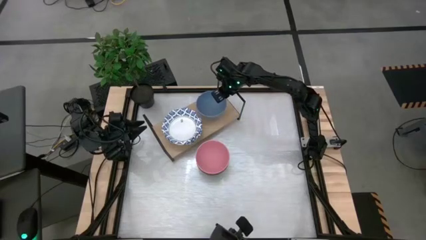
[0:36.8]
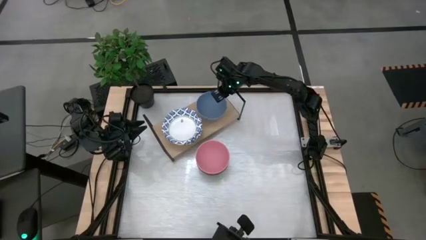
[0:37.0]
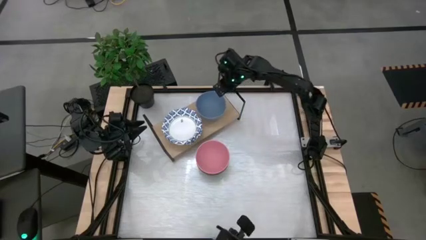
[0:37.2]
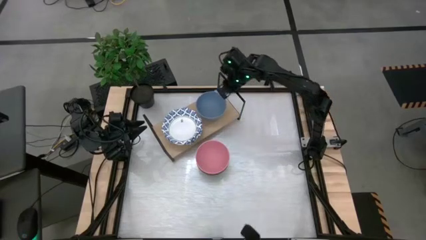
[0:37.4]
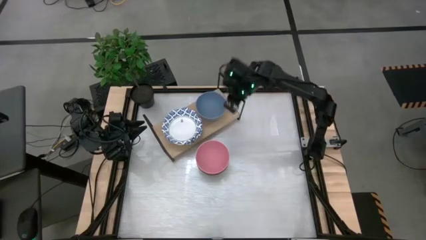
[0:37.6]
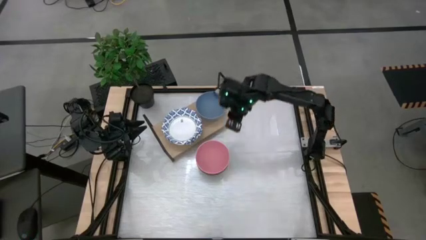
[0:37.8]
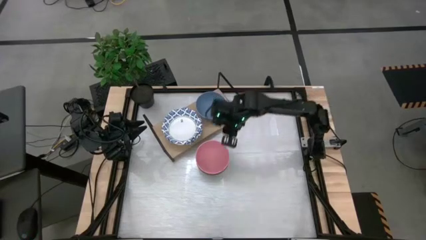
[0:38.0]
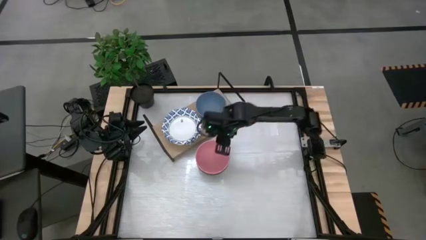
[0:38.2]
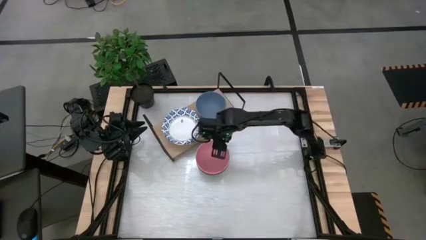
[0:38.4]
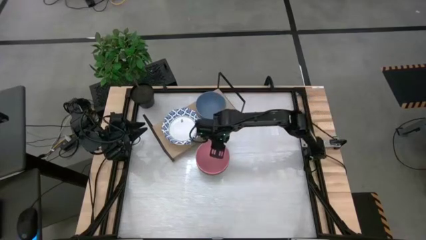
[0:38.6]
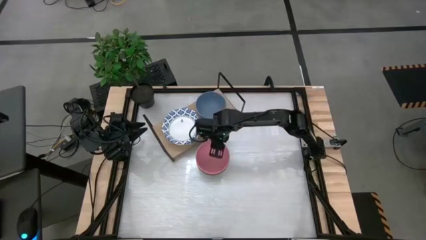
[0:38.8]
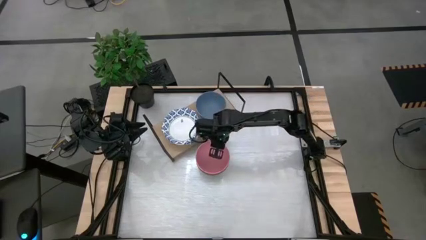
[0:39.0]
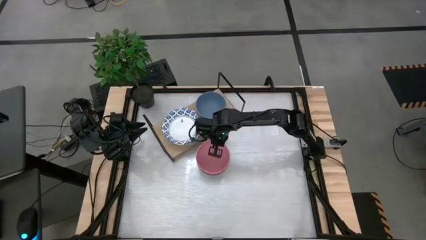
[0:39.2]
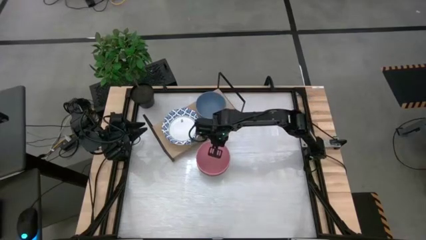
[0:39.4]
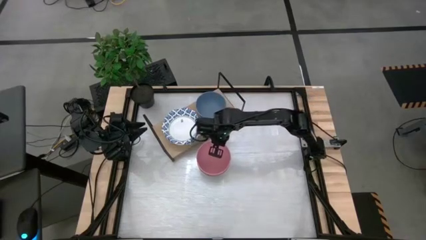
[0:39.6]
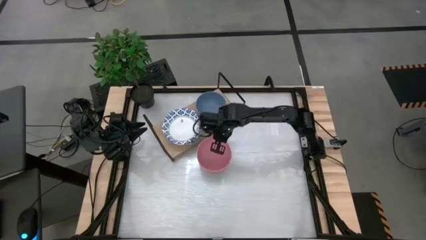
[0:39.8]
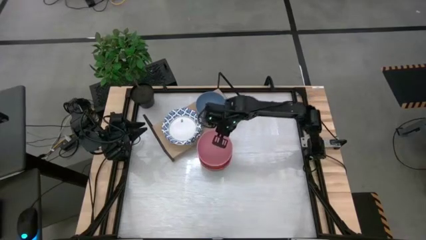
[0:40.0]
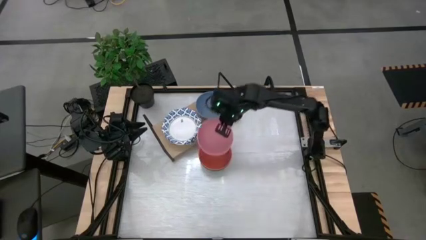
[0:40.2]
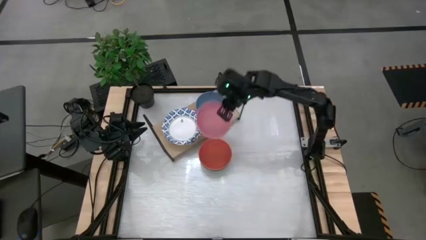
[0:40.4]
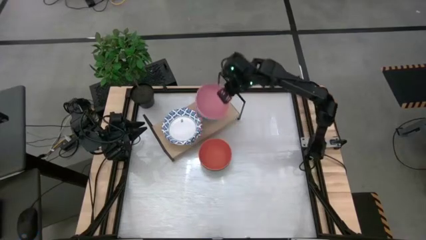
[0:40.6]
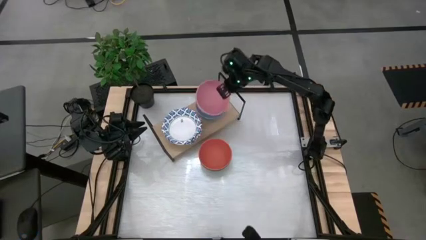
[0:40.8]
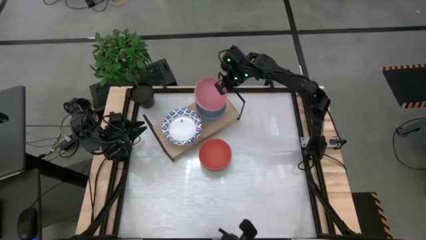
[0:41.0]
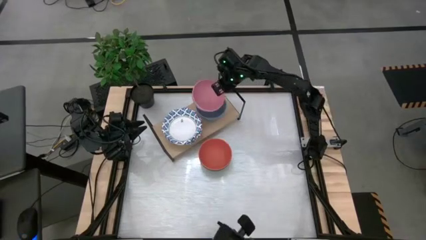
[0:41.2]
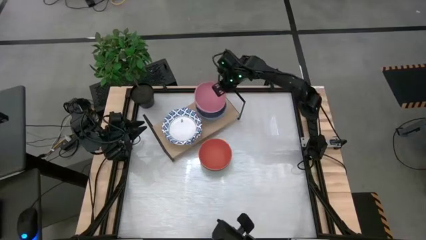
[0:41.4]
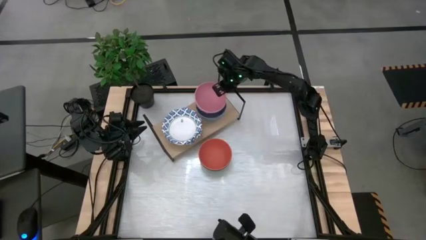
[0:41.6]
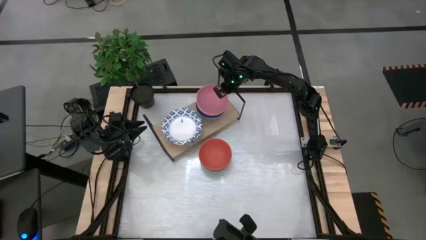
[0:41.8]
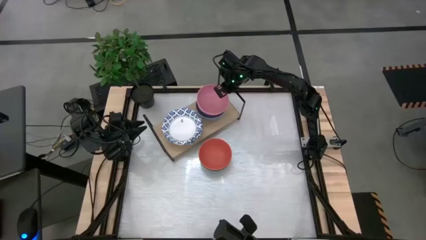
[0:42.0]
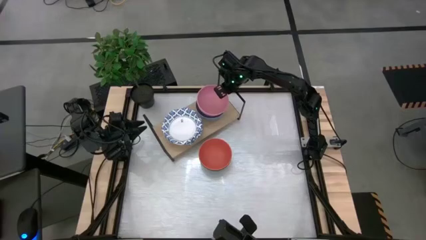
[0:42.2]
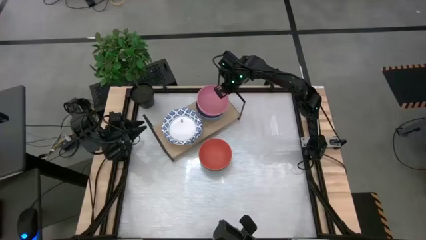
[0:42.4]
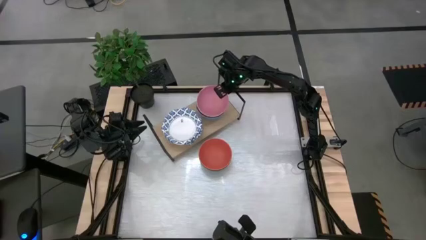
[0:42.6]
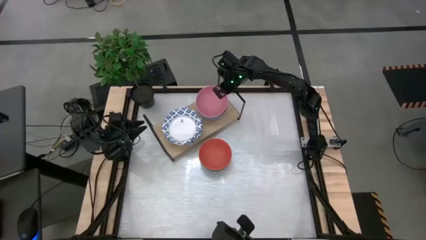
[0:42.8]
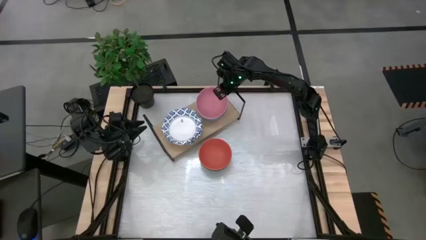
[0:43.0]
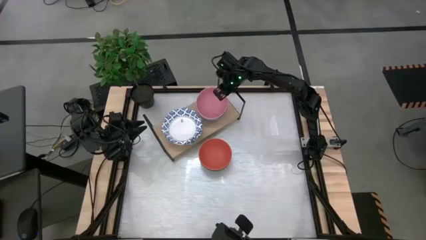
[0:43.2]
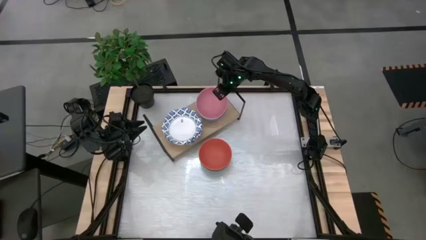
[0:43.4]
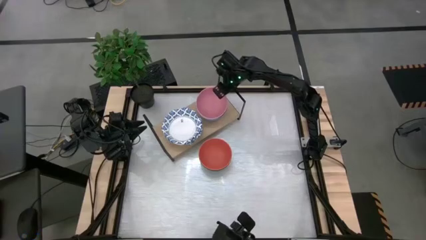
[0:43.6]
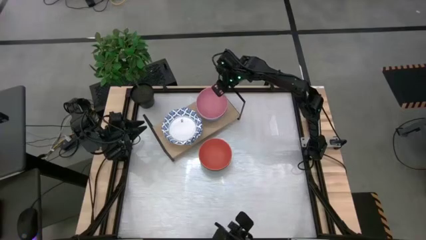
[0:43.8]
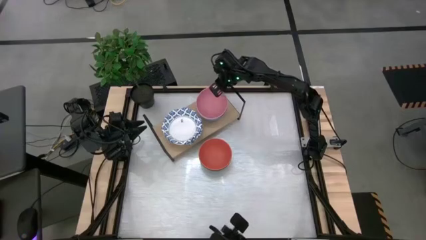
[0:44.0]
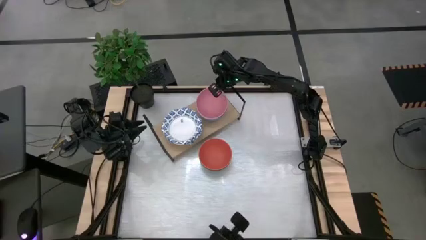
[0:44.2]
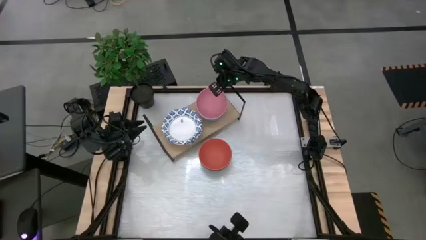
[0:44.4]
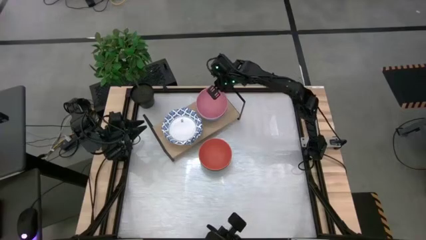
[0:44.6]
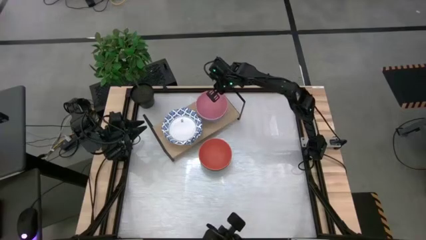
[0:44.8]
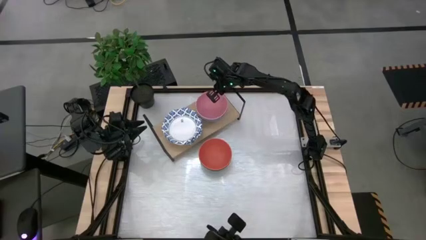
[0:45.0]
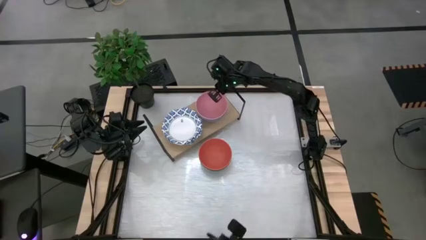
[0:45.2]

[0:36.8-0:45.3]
Task: Place and stack bowls onto a shelf
Stack the pink bowl on top of the blue bowl on the shelf

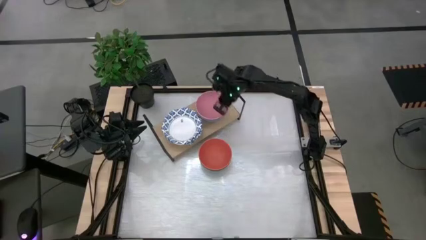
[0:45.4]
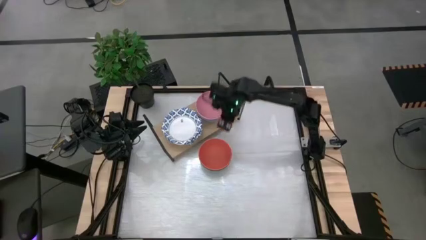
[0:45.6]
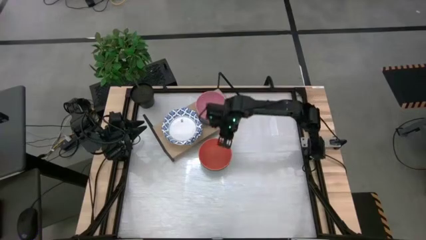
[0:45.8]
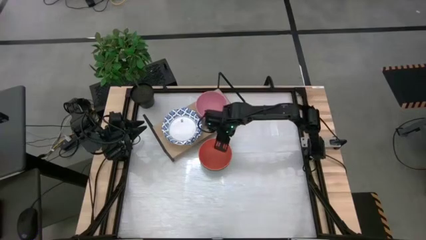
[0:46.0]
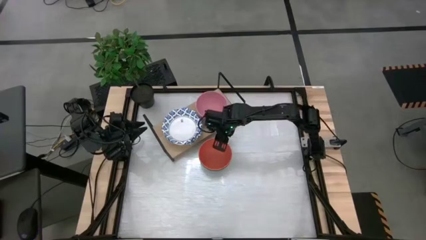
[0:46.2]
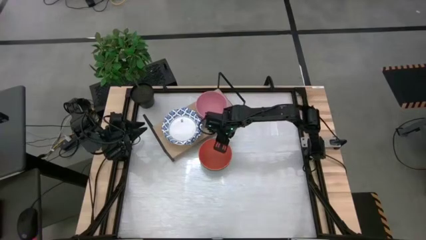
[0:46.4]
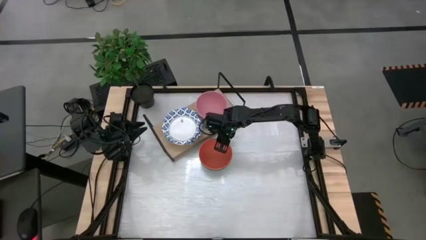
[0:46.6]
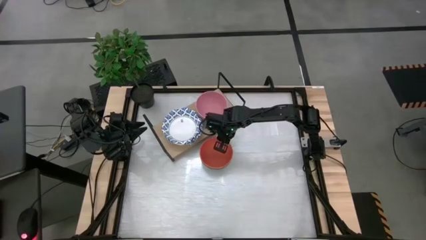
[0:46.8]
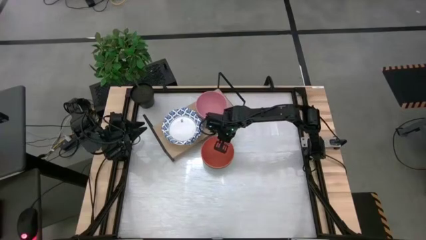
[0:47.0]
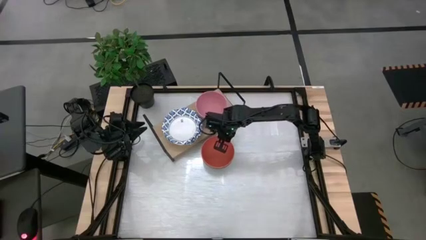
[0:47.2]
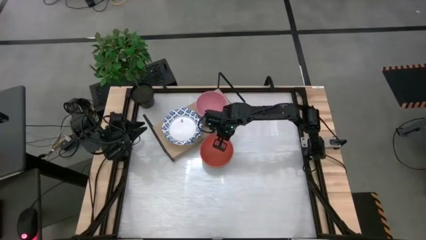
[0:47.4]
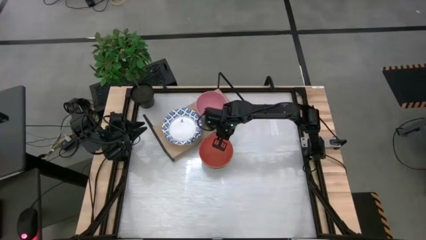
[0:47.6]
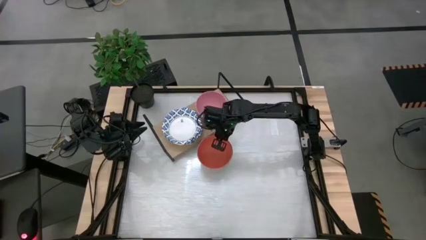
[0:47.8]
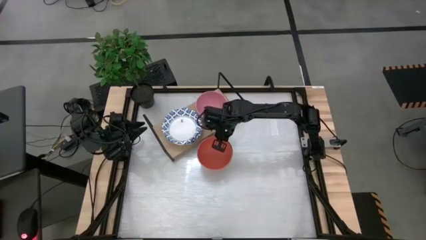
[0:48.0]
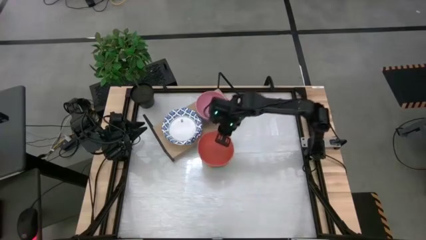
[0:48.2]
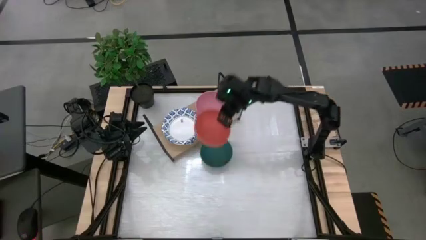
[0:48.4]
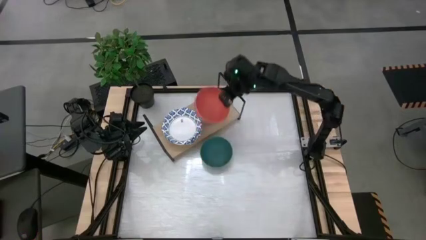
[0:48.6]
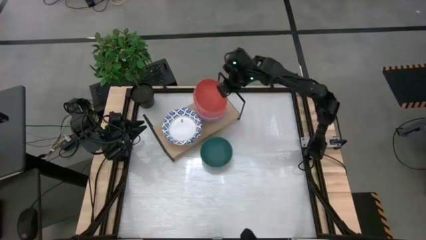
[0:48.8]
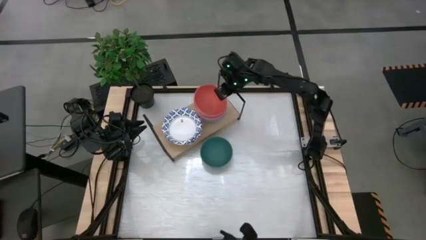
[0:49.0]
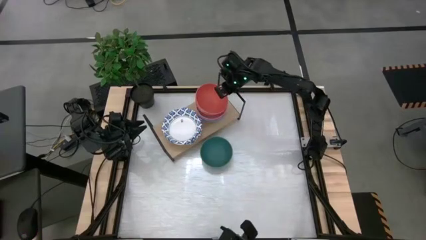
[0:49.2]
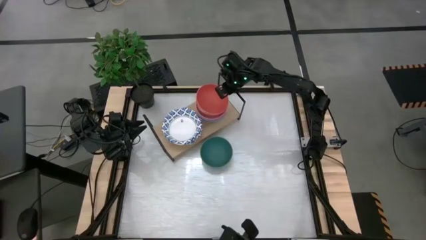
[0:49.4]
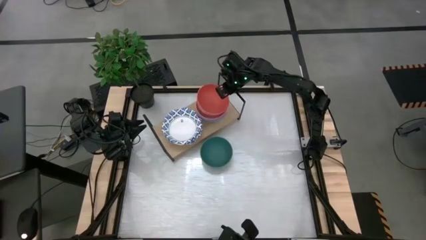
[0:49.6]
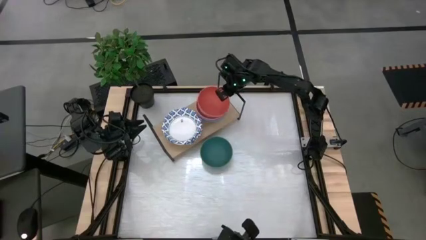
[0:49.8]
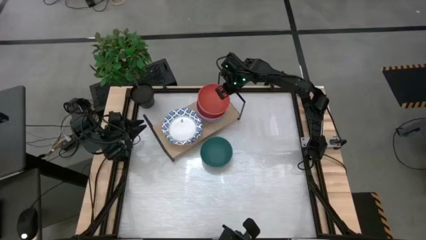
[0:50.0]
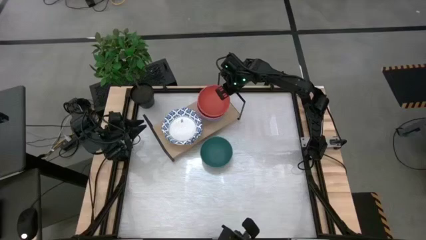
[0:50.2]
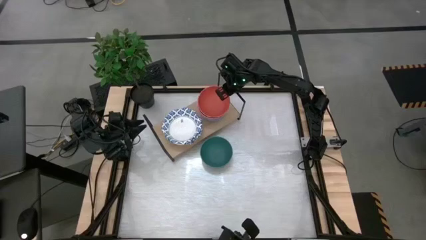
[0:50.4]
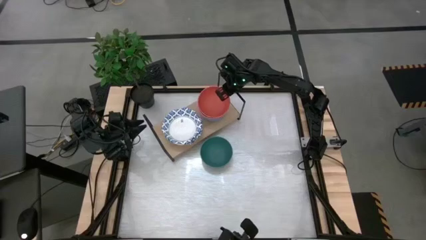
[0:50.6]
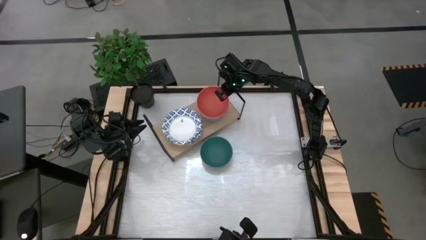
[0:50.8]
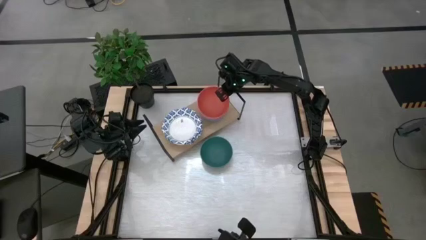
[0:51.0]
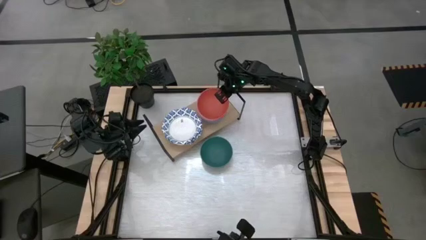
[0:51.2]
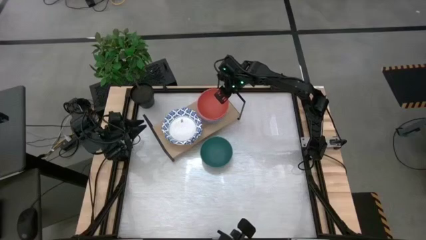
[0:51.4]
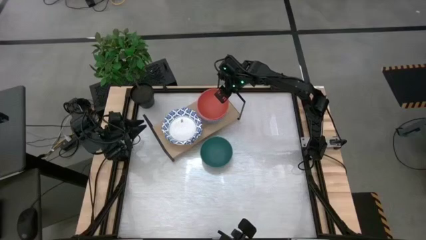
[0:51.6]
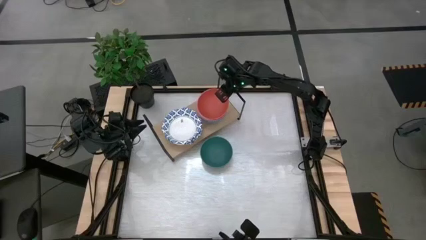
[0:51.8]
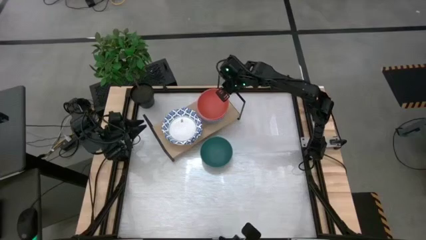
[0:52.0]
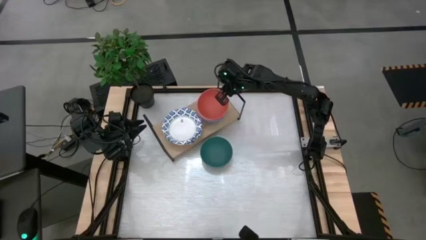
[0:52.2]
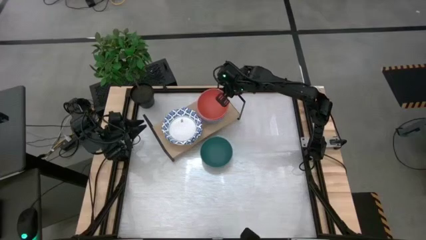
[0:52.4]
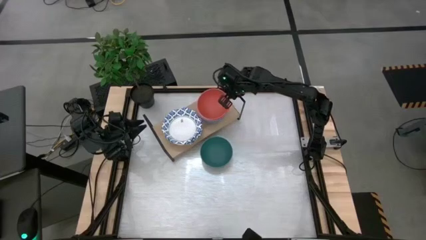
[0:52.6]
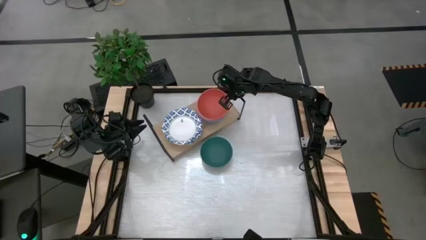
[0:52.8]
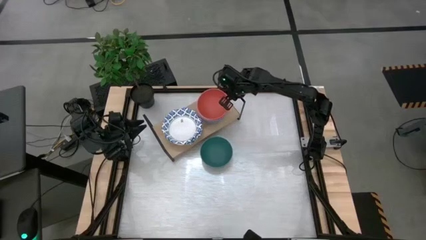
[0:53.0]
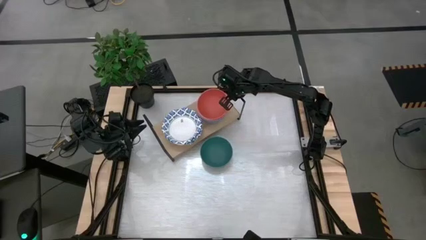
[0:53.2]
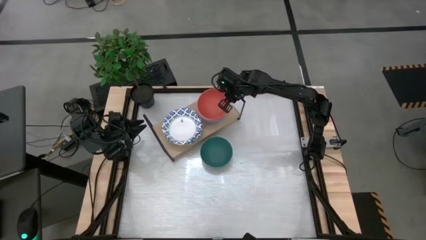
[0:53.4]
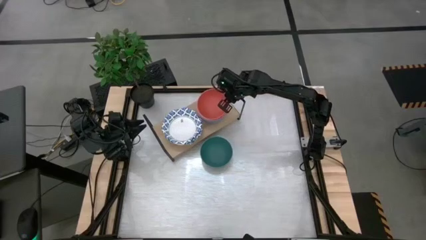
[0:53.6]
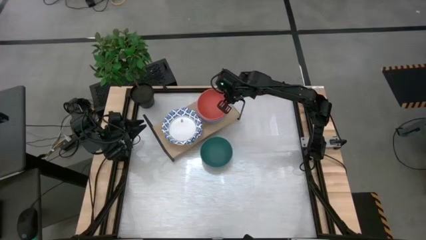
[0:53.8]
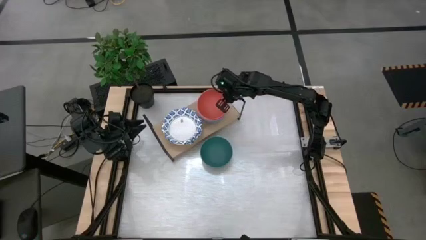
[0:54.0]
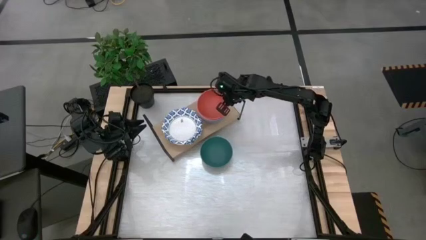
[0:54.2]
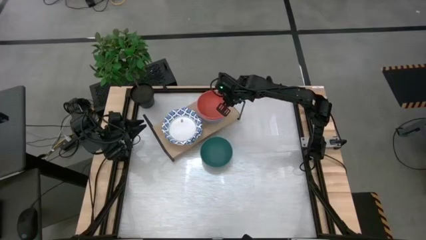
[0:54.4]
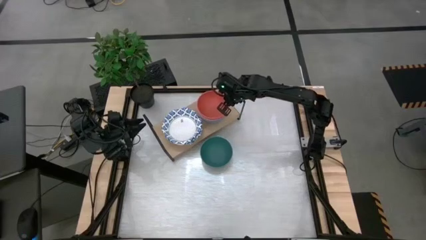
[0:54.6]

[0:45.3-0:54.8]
Stack the orange bowl on top of the pink bowl on the shelf
